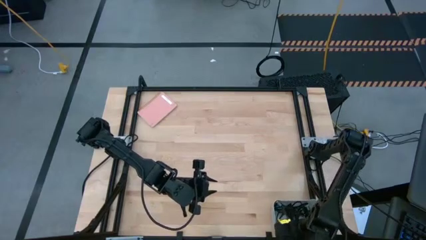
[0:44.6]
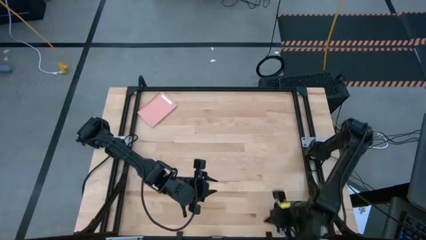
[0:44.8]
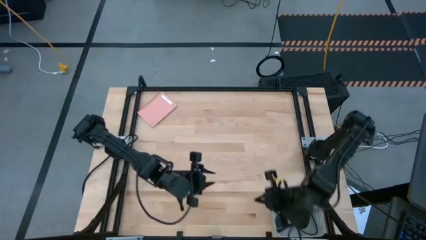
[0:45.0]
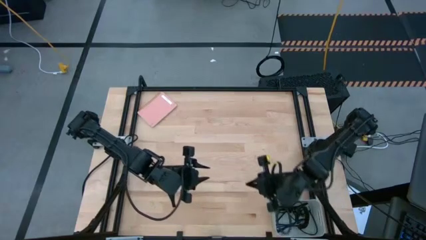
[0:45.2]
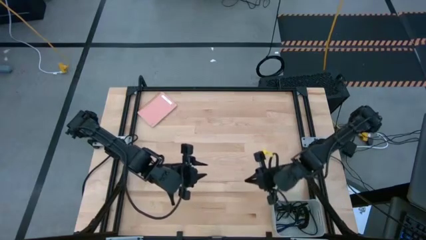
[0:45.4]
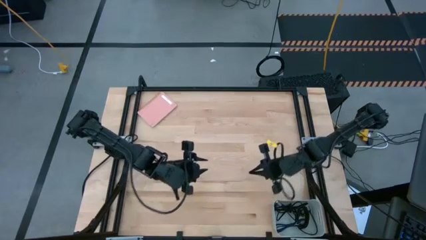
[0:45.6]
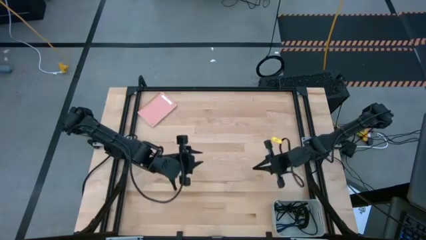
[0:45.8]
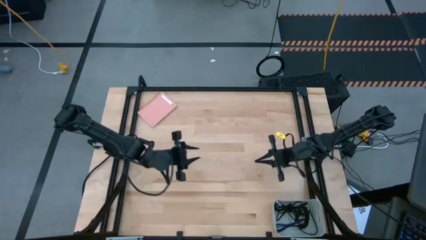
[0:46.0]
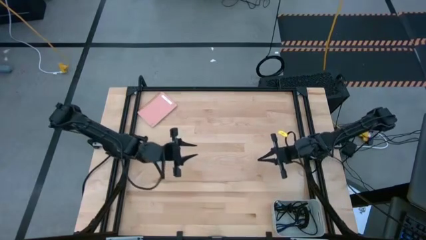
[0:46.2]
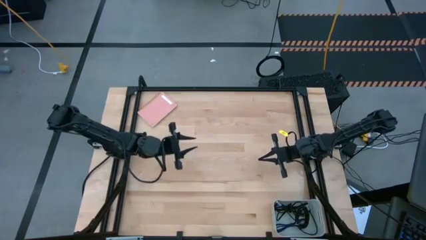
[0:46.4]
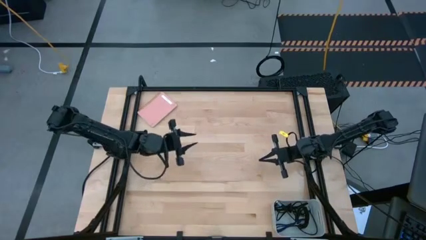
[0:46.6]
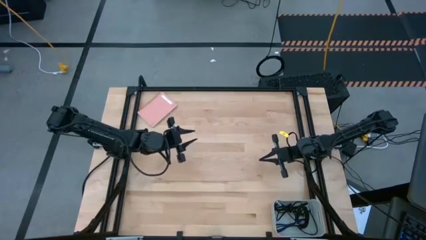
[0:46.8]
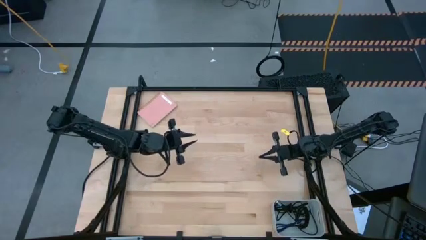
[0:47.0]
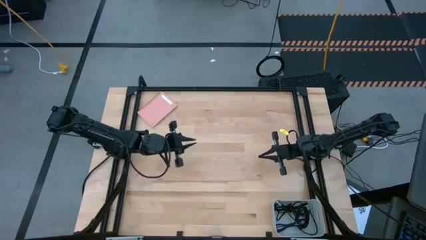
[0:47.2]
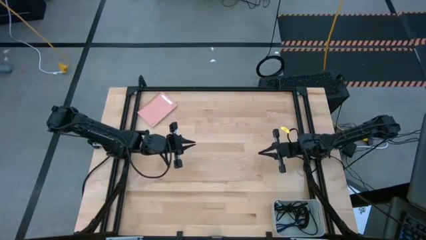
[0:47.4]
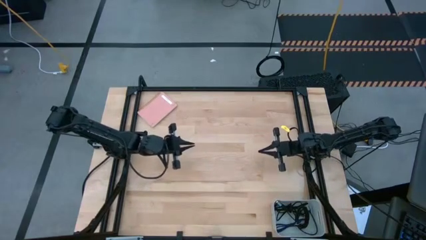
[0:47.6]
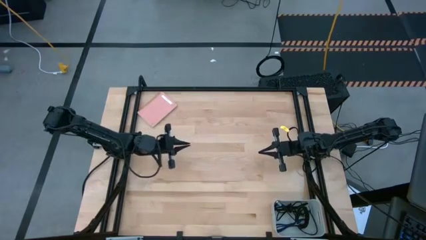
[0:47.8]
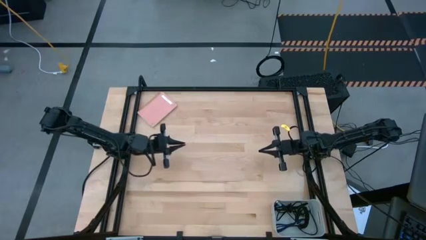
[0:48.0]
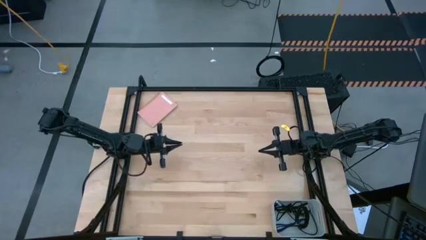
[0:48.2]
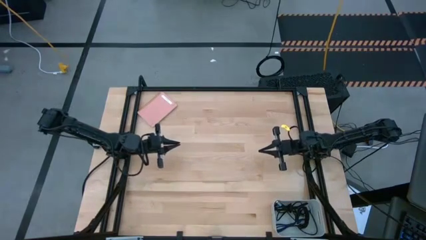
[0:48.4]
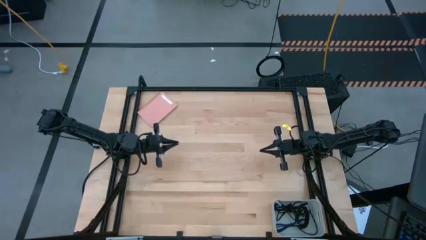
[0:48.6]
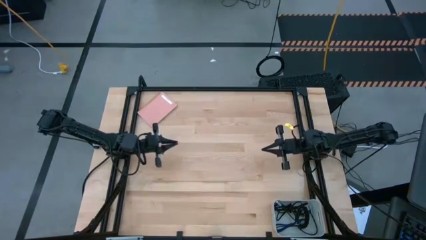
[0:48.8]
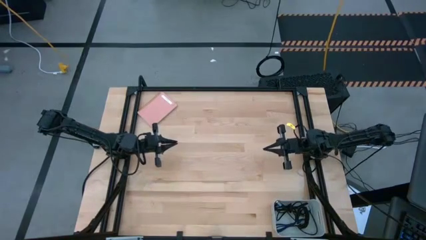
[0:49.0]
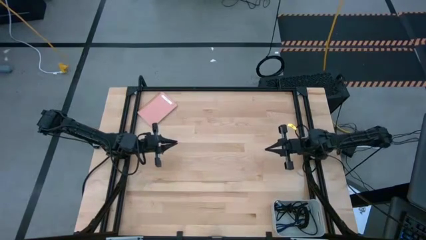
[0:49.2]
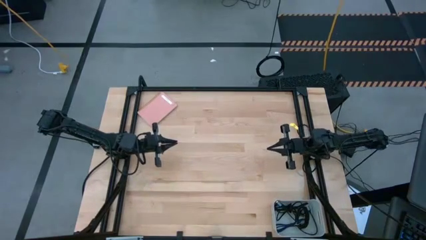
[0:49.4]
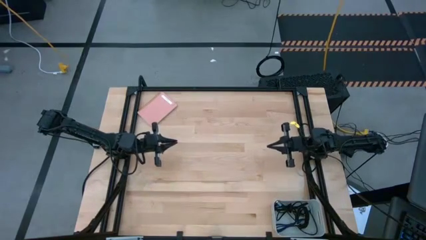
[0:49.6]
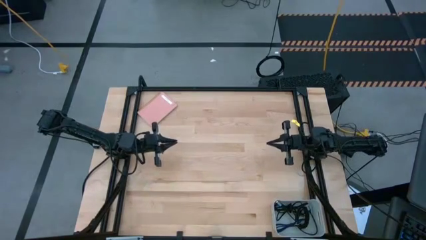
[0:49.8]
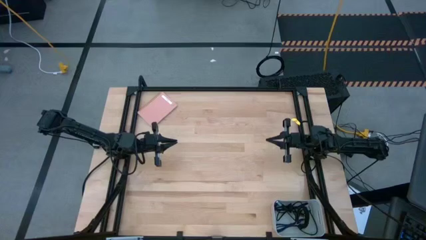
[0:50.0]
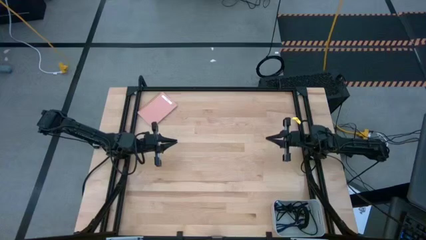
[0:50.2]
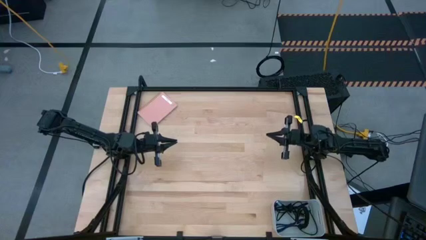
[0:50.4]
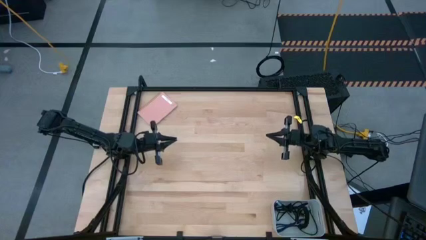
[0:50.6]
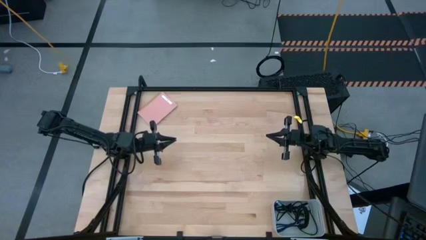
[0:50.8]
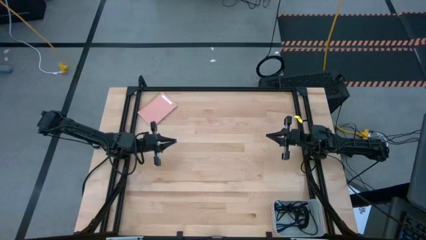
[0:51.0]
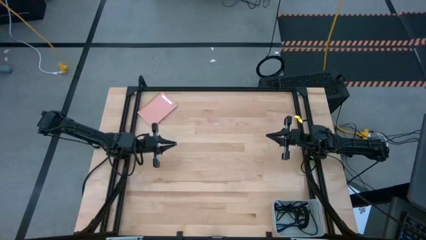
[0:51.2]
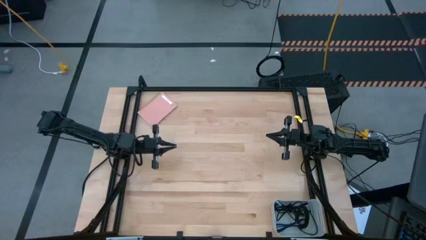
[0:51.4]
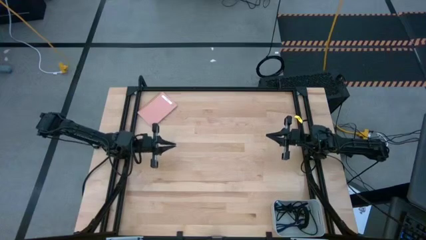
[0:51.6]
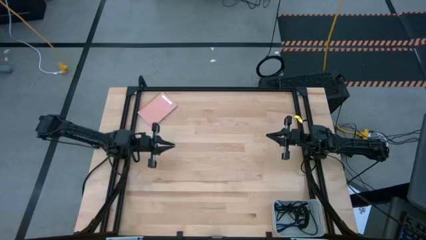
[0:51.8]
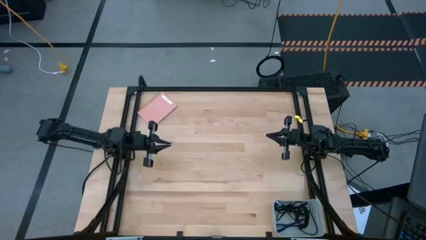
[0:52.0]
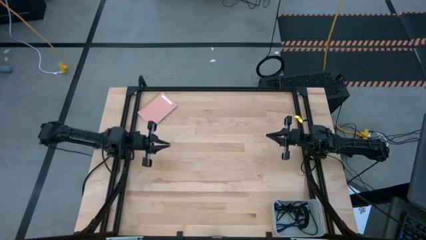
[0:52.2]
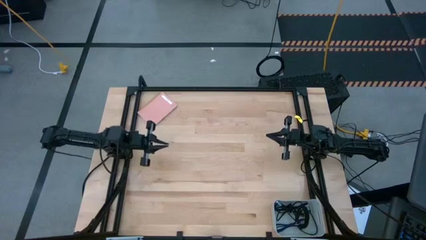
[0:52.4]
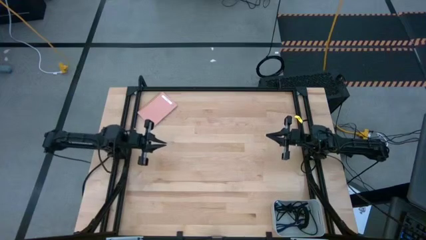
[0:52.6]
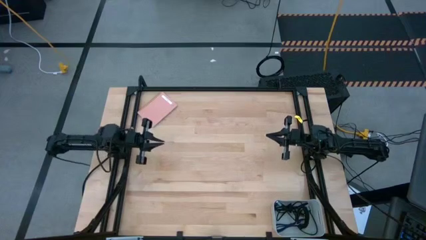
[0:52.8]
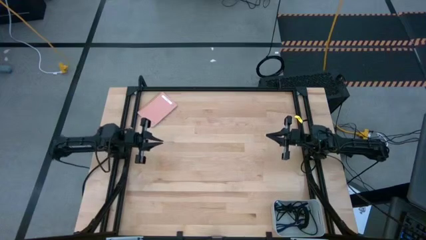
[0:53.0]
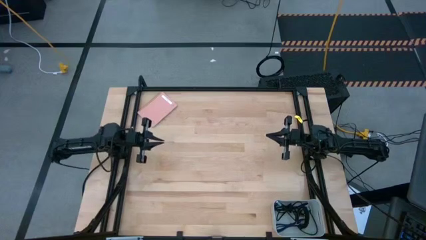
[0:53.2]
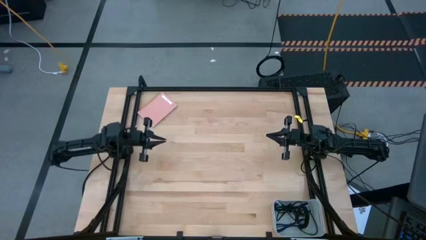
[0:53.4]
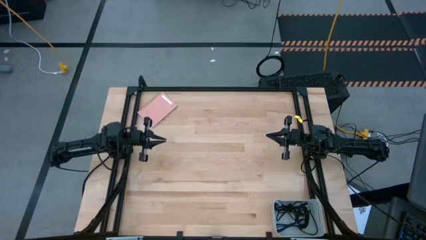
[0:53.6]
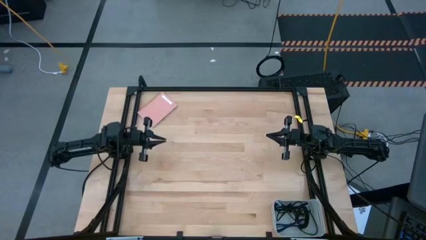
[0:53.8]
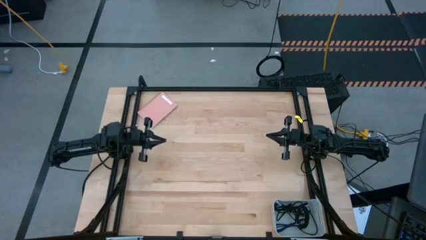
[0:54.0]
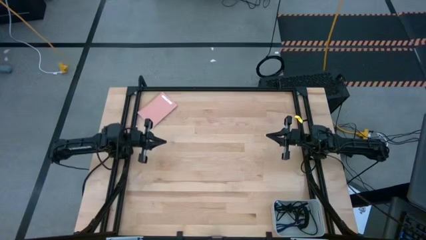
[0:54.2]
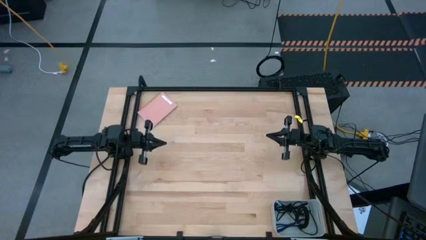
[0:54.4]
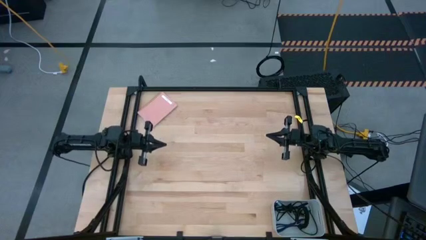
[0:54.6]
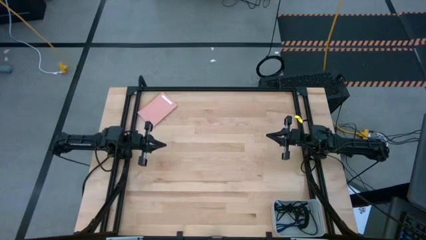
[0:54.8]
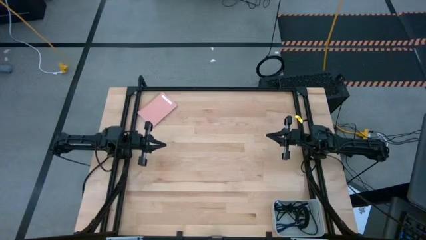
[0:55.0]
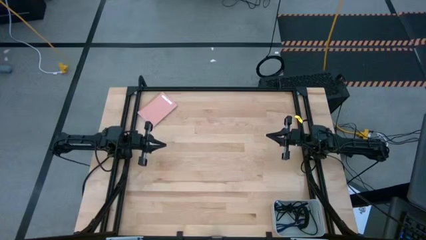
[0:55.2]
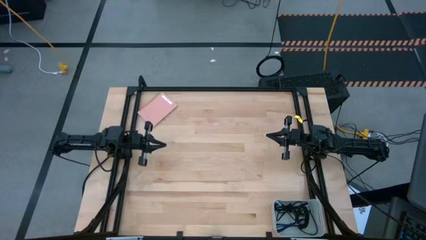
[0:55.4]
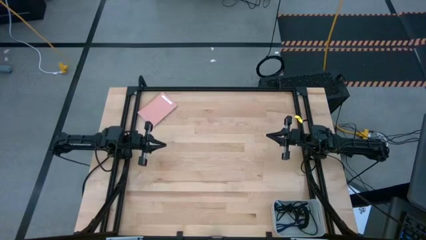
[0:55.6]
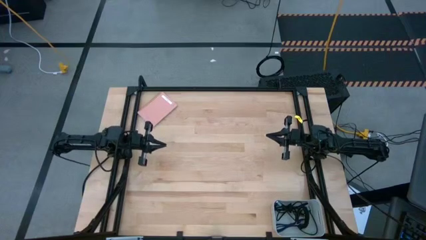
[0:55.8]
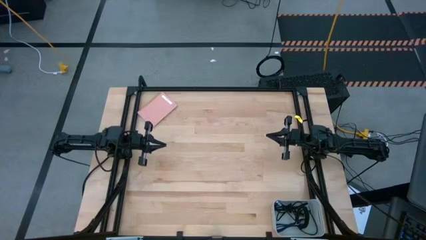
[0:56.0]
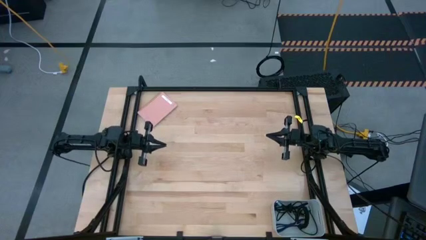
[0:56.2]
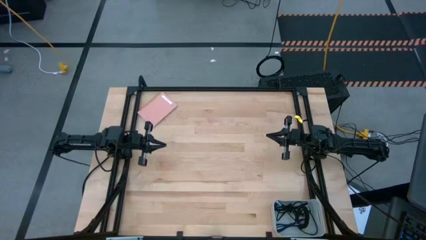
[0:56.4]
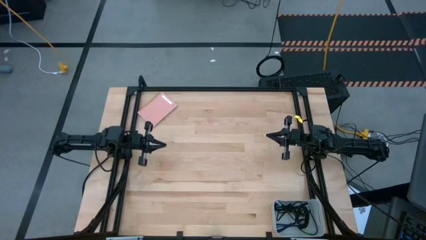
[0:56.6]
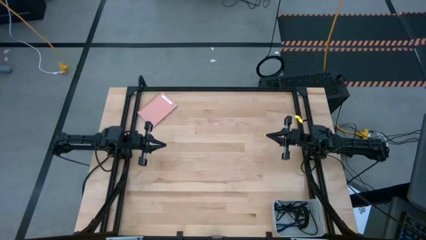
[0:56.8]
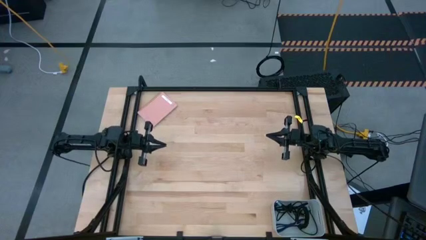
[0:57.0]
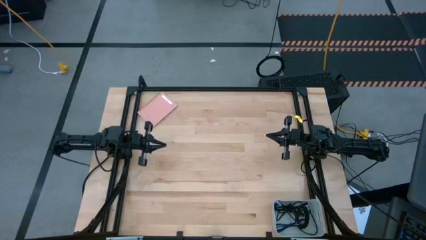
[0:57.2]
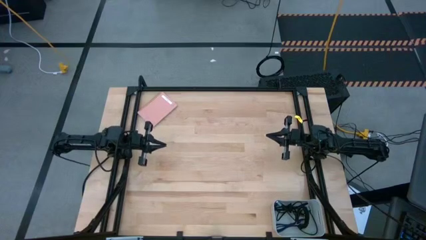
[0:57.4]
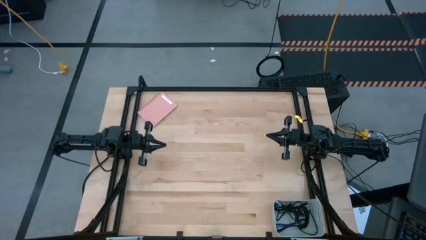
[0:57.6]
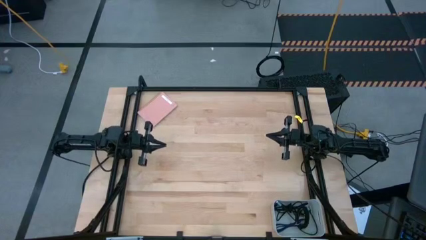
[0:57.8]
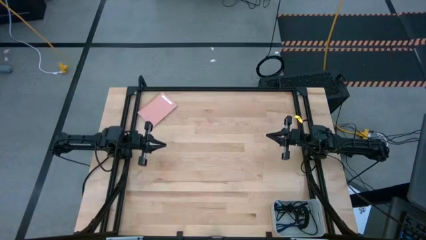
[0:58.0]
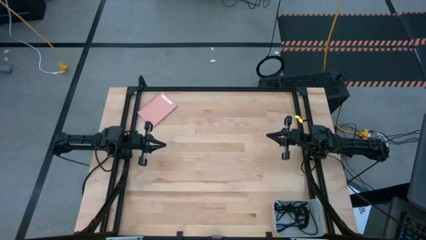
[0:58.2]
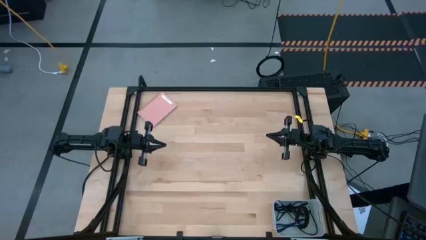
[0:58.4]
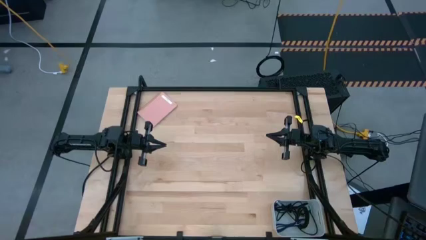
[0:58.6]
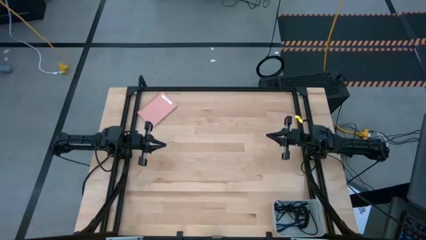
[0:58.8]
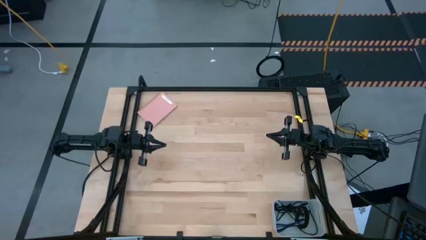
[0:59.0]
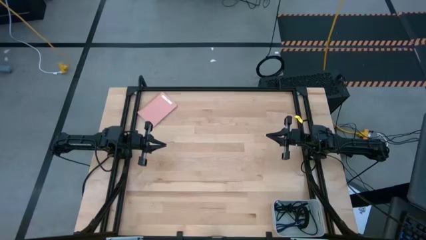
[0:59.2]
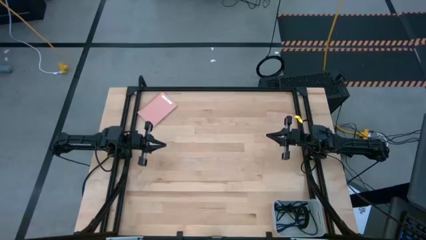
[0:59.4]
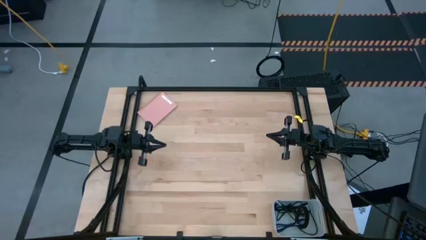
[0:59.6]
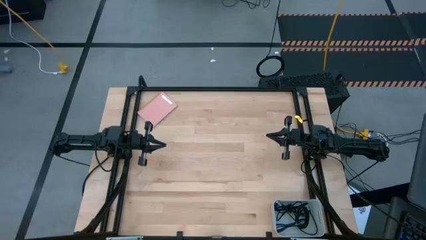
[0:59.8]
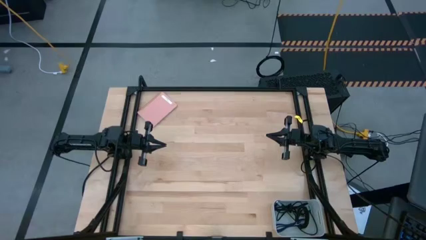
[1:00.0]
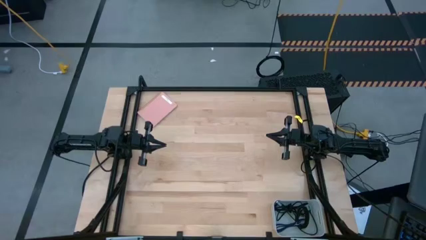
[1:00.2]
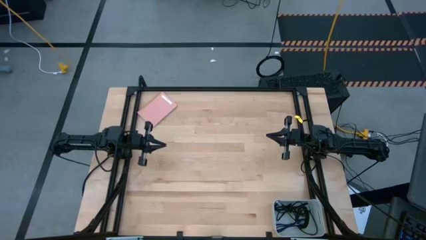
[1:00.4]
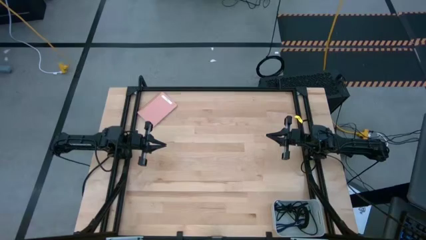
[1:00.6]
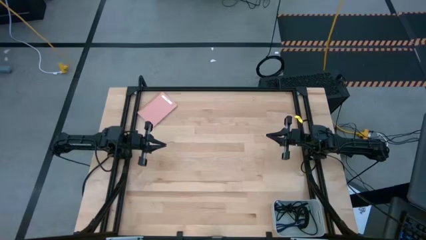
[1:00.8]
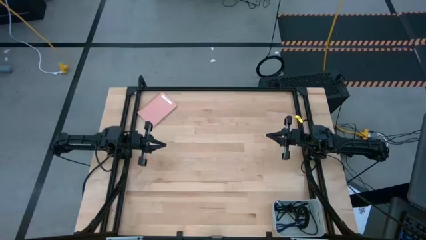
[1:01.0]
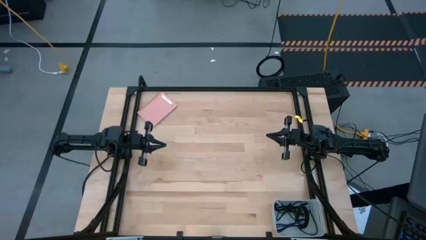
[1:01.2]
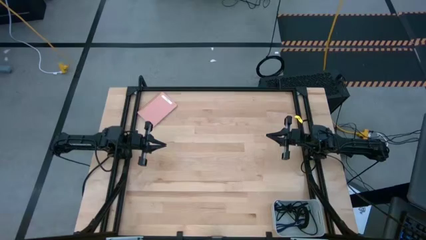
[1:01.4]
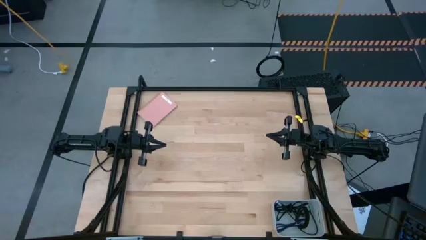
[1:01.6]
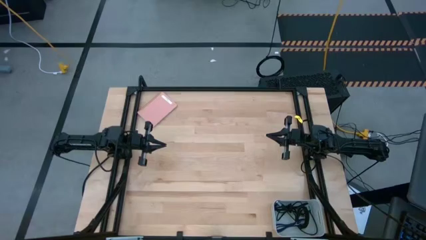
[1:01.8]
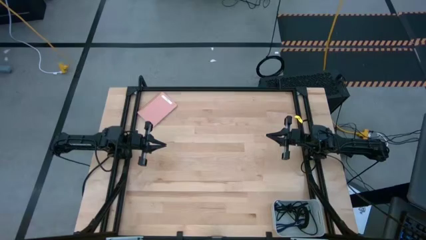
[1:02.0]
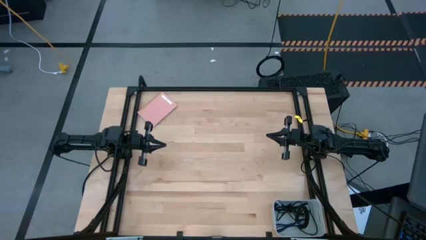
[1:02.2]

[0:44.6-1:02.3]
Task: Pick and place USB-C Cables
Return to Home Position
